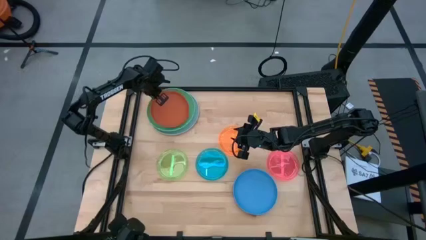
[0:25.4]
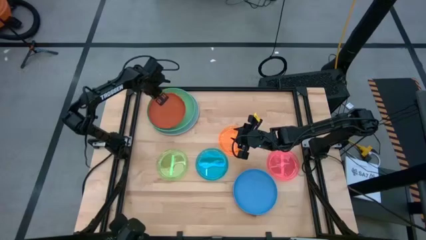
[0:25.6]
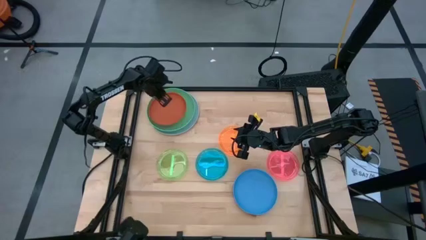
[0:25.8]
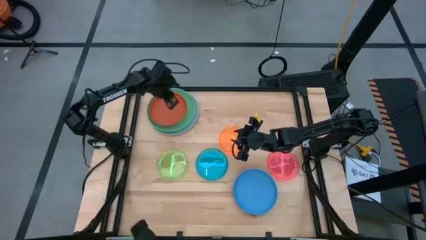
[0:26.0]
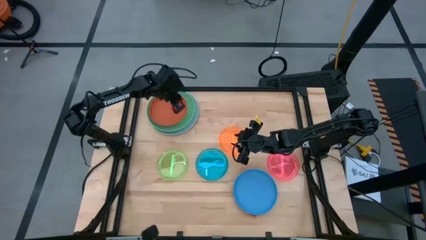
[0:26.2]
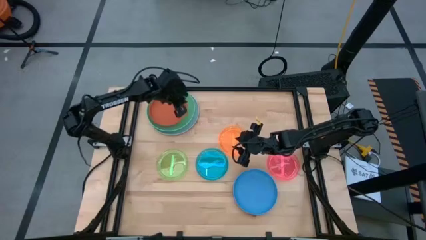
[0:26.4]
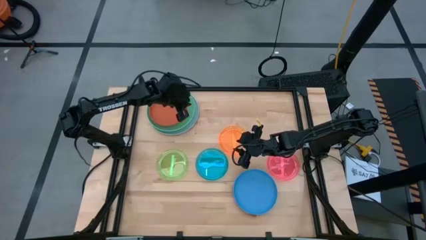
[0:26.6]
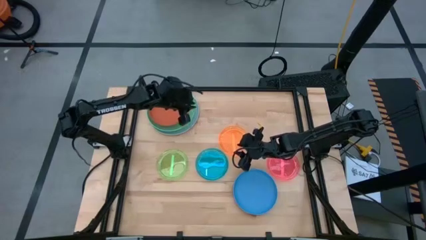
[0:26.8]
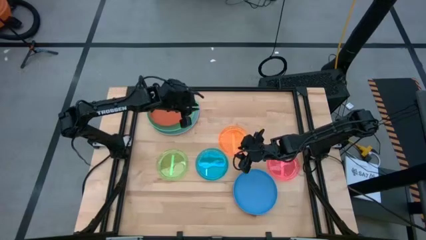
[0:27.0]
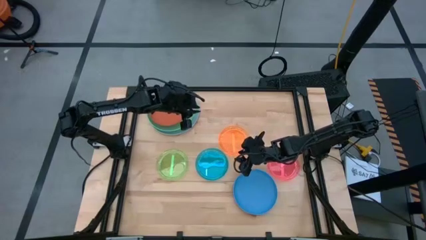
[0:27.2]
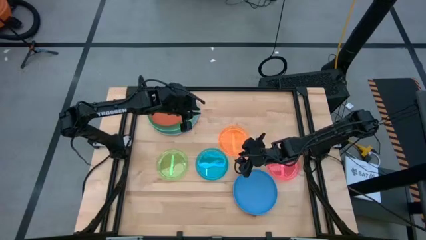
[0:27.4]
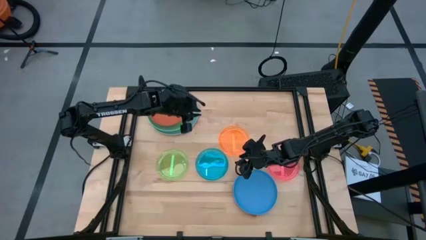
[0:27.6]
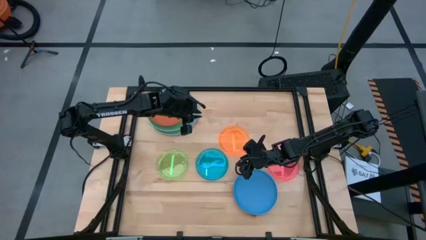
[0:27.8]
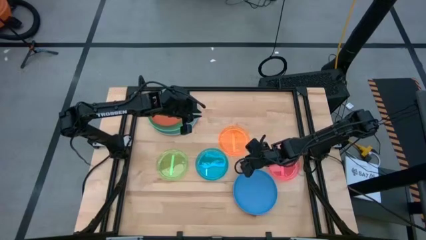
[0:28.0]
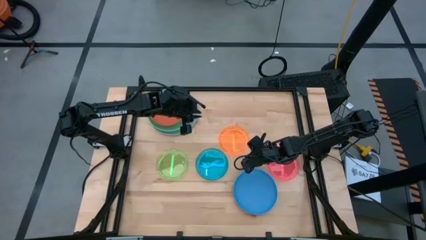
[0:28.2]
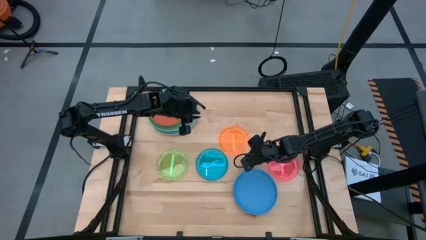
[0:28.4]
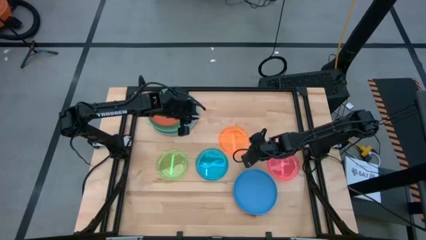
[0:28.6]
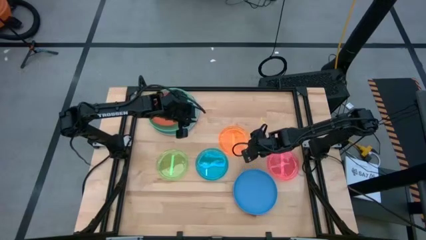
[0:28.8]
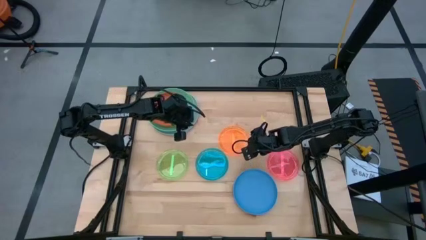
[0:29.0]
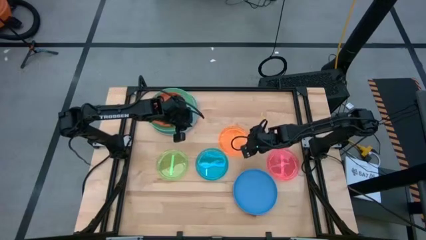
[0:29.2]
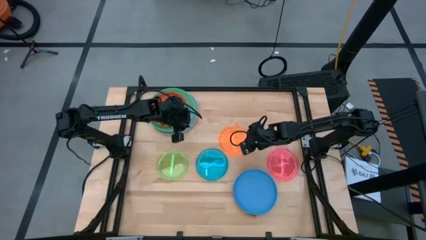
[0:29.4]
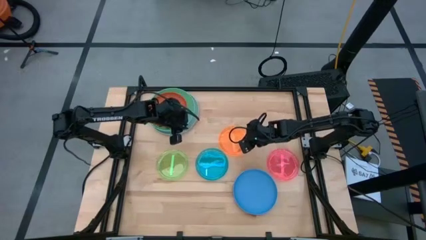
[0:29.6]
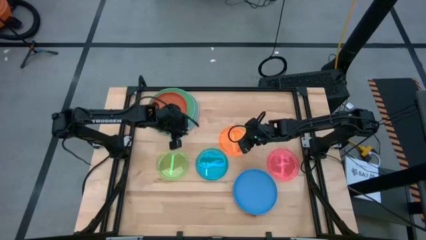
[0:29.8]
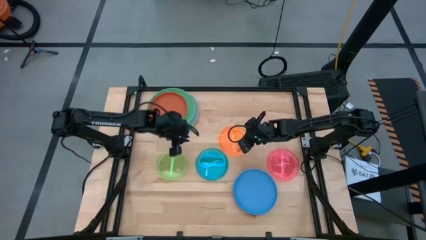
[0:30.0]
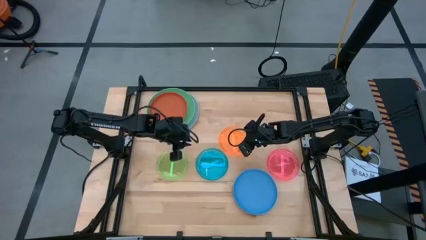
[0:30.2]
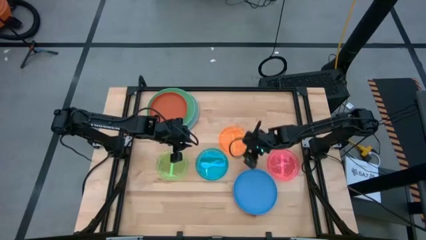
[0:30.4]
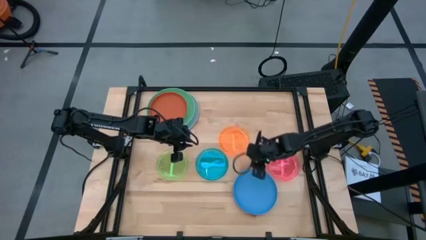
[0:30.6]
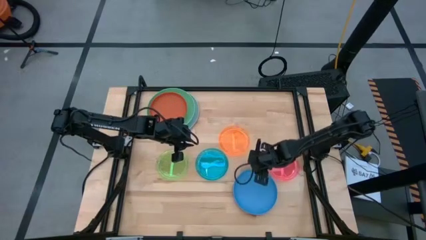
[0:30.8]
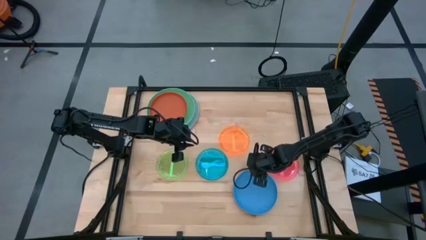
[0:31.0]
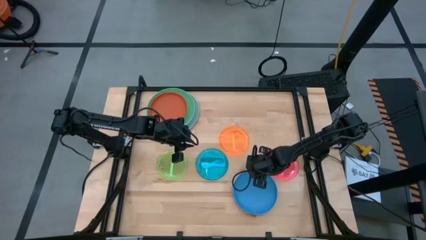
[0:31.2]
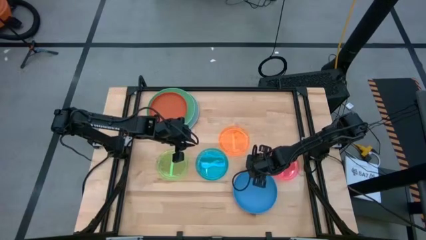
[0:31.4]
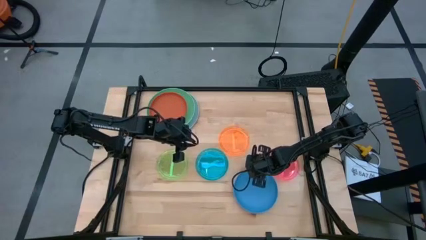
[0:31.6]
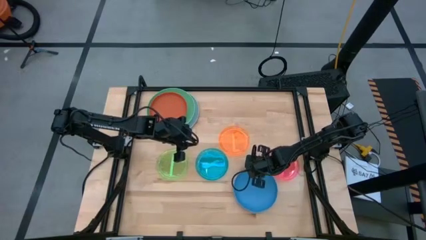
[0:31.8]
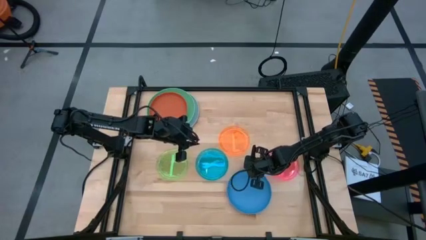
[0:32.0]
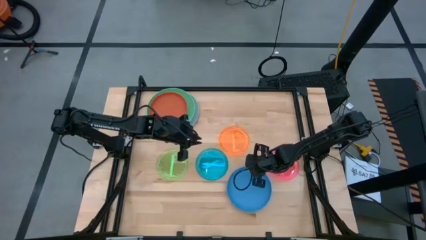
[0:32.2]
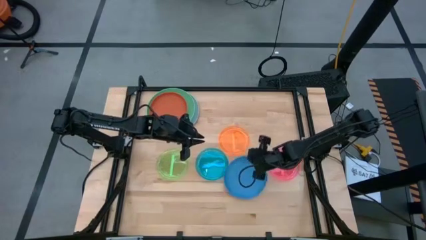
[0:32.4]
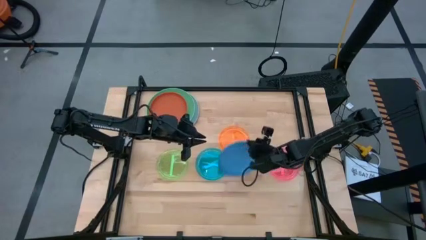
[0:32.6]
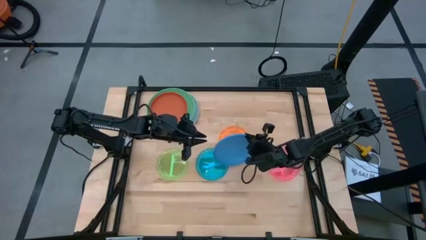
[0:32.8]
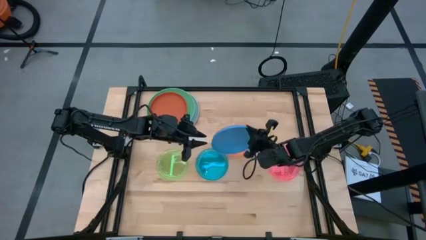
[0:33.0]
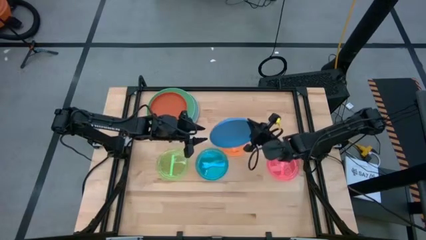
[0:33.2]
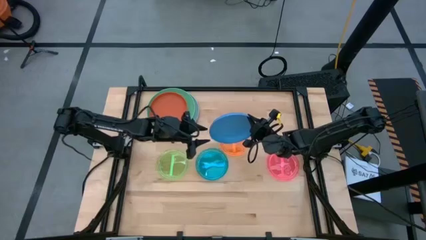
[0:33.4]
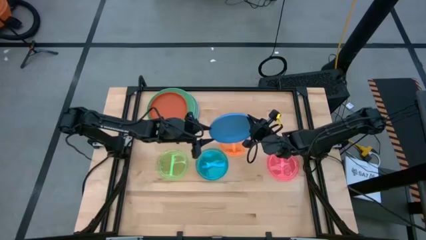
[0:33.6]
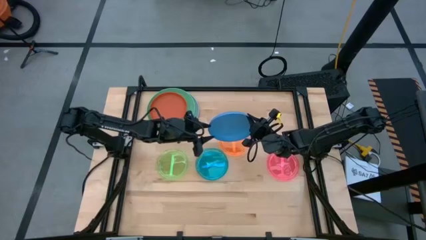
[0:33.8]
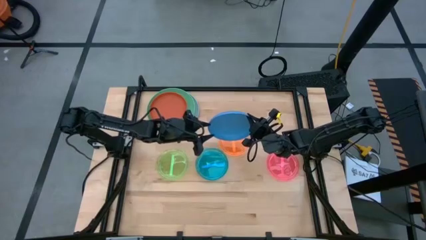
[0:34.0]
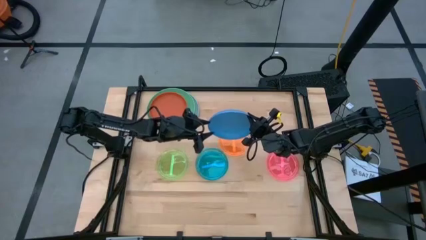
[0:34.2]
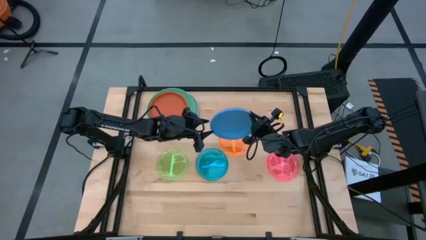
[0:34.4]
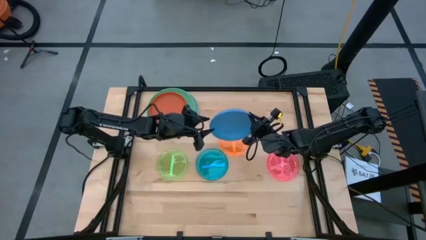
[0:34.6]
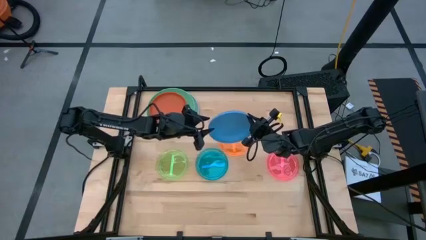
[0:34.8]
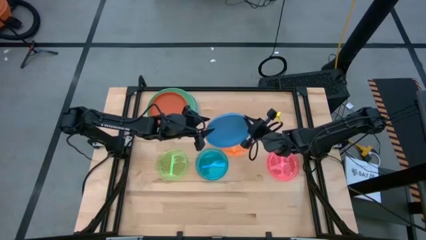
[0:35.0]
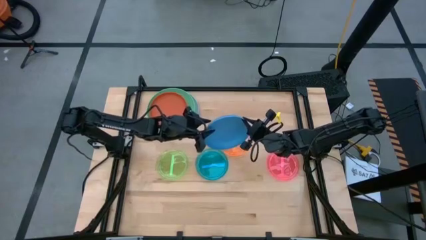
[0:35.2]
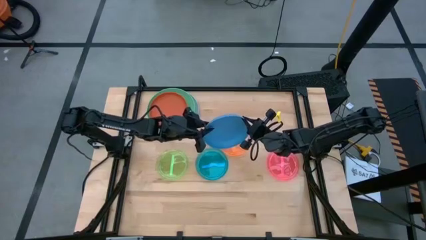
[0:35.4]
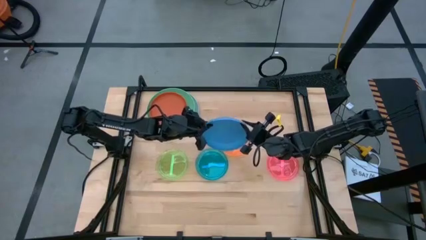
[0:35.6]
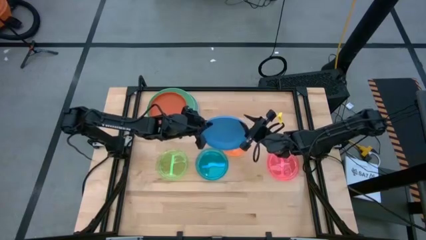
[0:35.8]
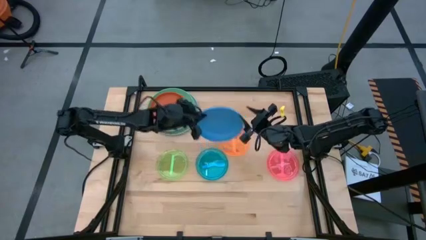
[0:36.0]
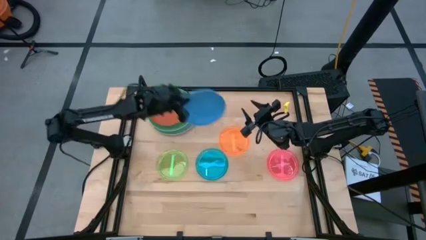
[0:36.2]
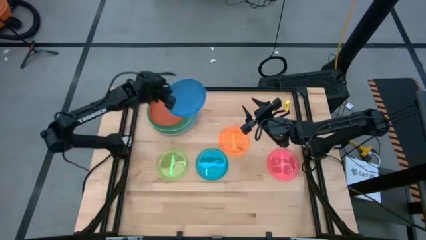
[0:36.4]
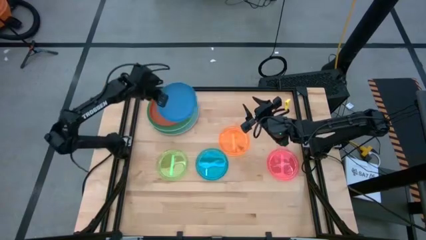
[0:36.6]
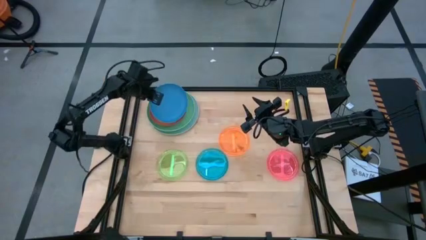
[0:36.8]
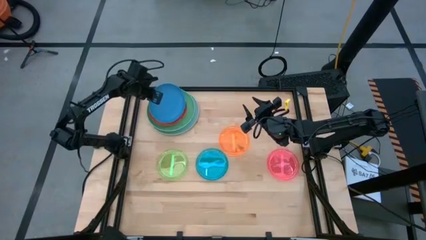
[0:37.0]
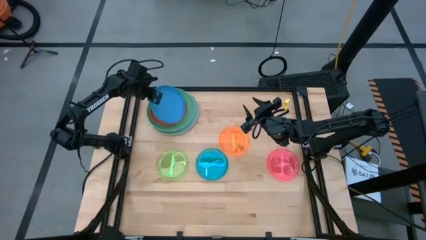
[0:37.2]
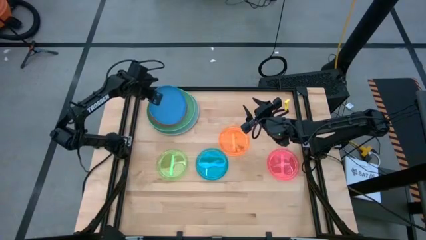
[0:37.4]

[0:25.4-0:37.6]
Task: Stack plastic plates
Stack the blue plate on top of the orange plate

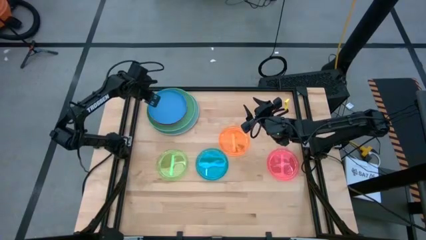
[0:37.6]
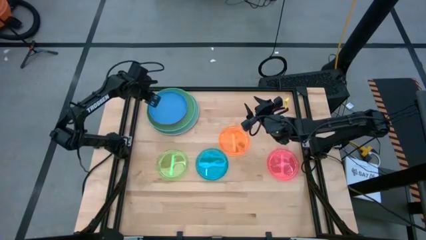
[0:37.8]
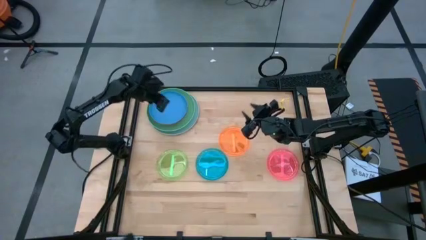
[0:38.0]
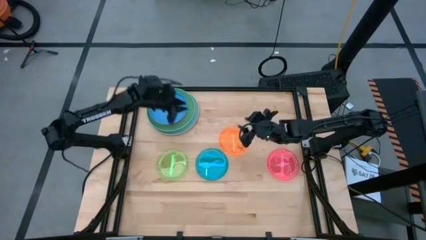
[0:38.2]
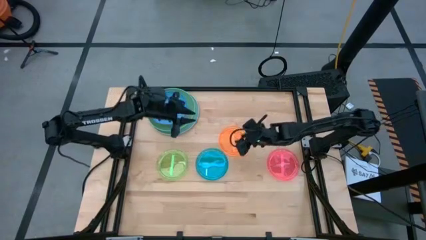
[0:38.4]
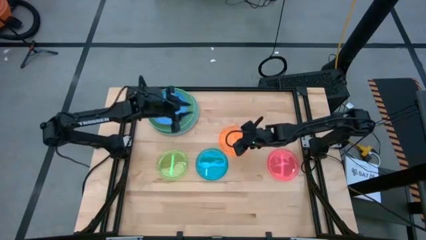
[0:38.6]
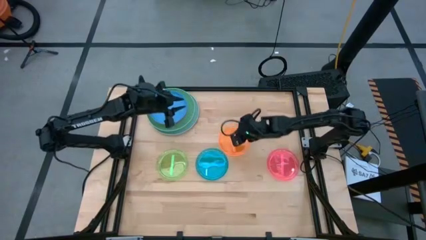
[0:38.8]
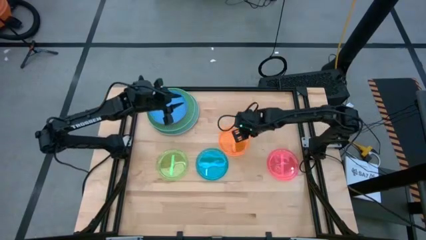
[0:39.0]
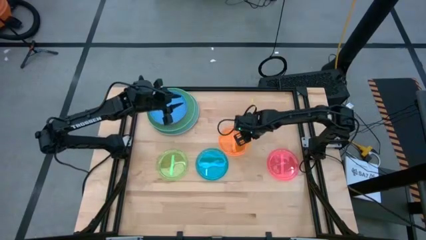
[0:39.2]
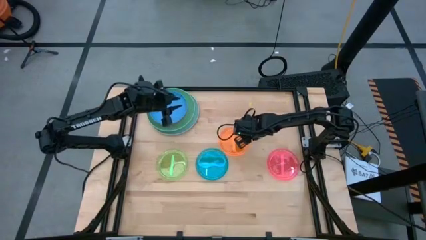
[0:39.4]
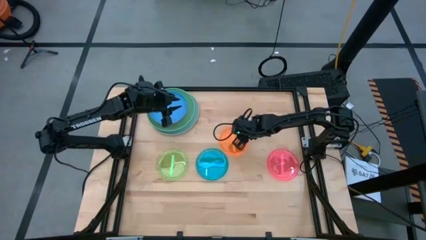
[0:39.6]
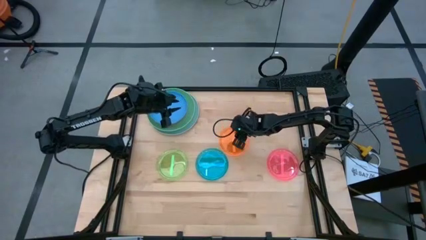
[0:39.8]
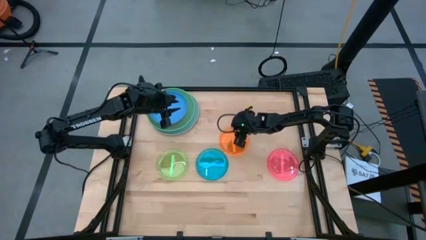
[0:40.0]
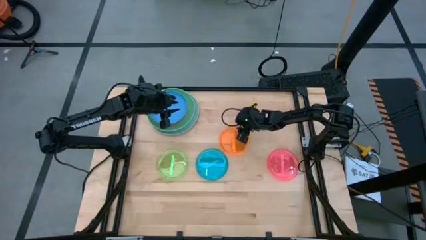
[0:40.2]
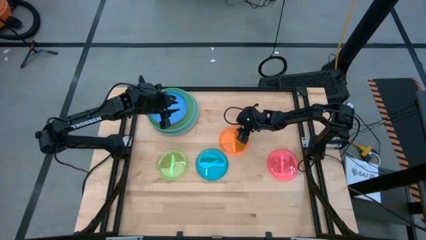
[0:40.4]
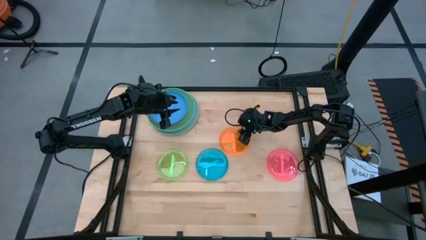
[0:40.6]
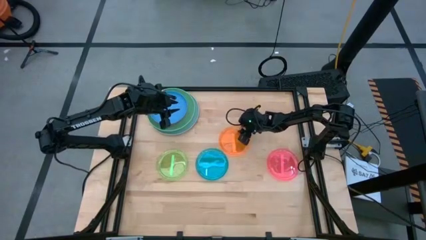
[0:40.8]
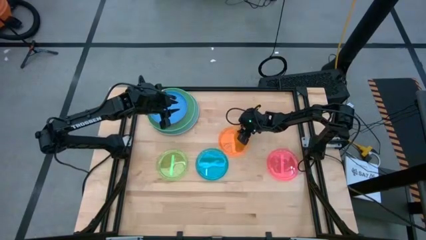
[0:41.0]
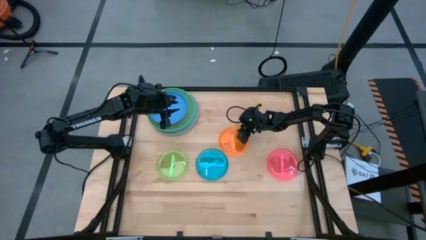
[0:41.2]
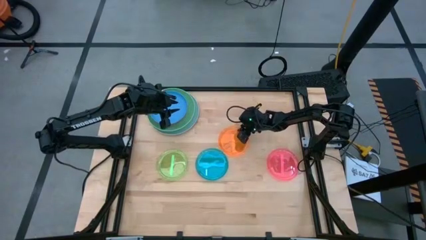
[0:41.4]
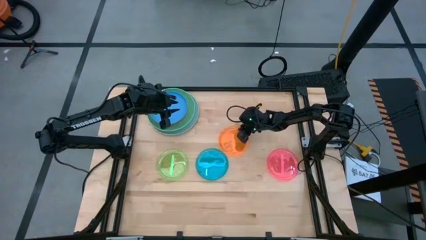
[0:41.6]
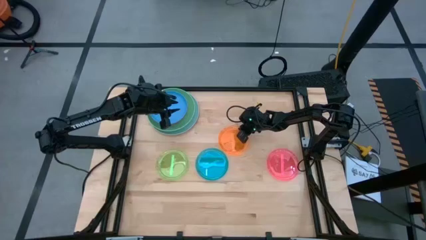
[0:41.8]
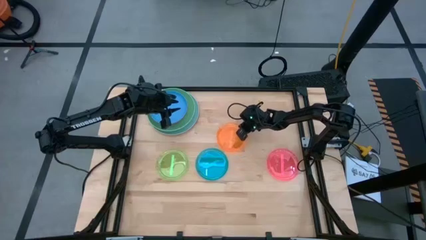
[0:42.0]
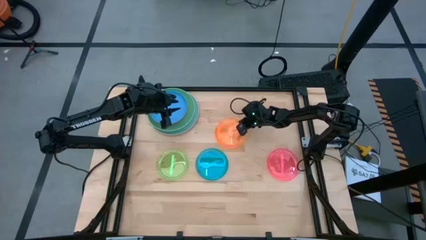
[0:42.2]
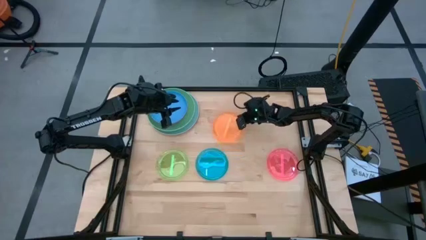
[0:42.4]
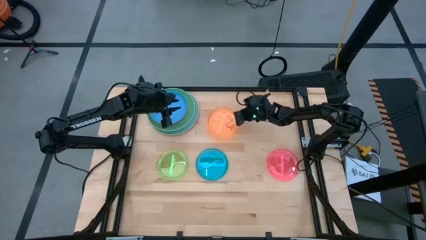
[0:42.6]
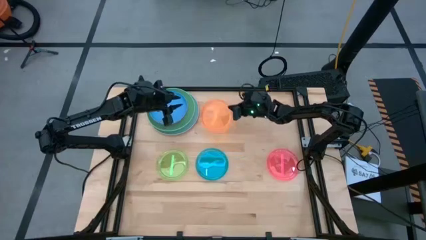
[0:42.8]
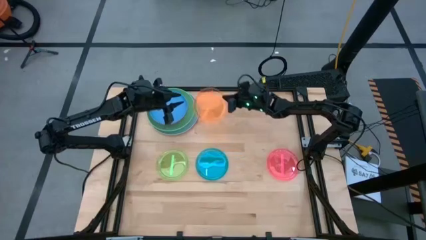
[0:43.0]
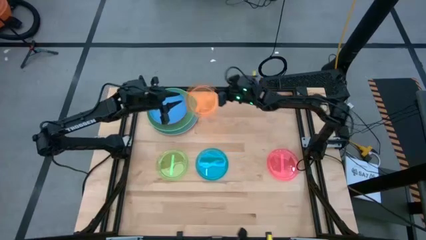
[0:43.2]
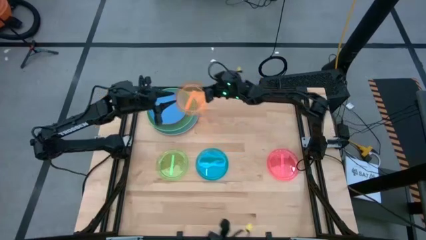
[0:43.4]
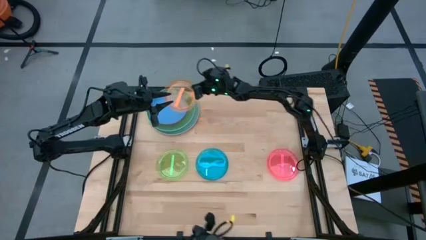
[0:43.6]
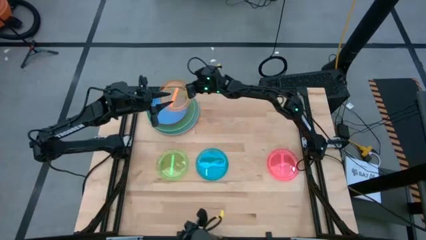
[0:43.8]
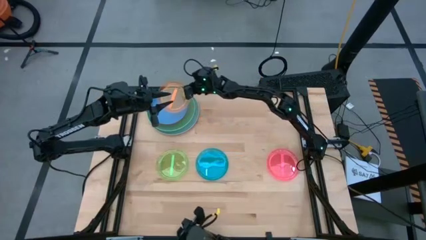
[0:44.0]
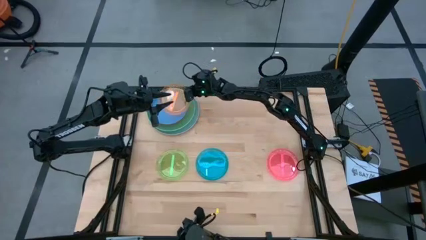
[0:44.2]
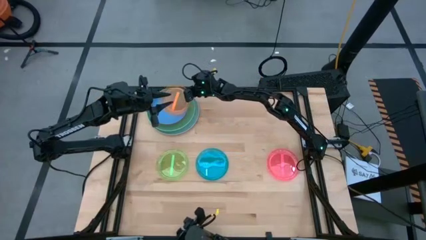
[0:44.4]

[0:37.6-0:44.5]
Stack the orange plate on top of the blue plate
